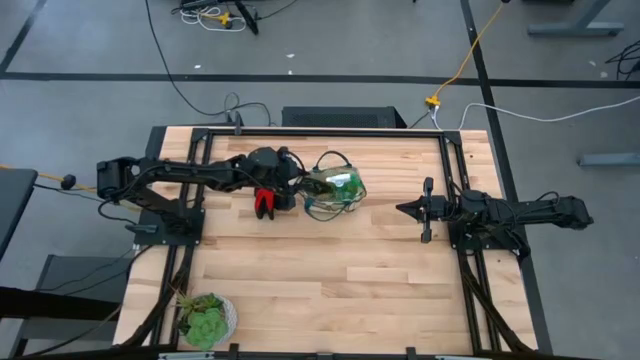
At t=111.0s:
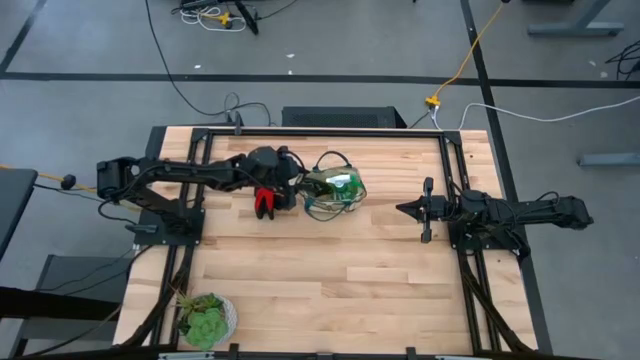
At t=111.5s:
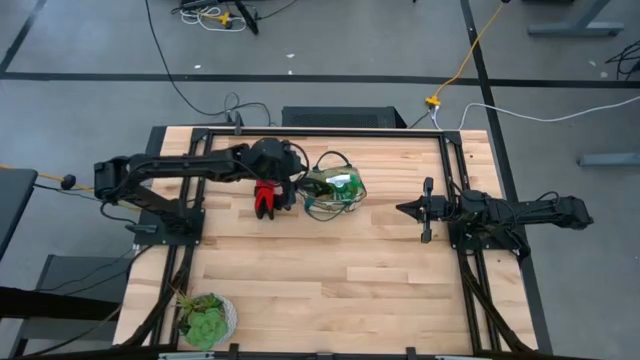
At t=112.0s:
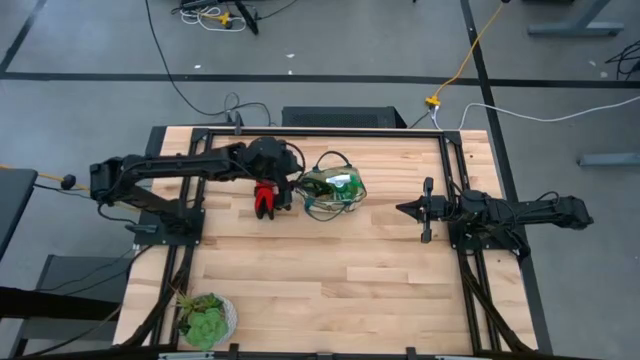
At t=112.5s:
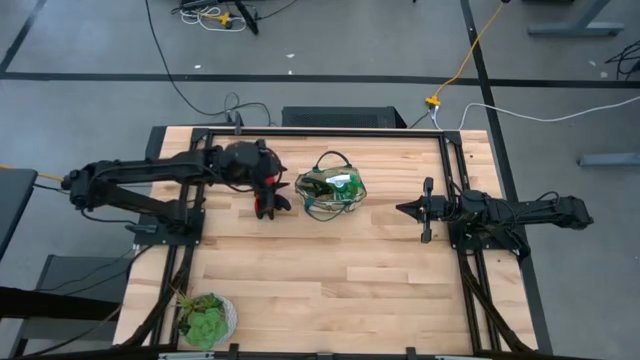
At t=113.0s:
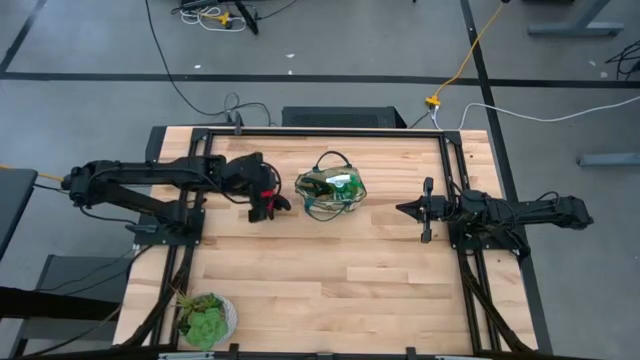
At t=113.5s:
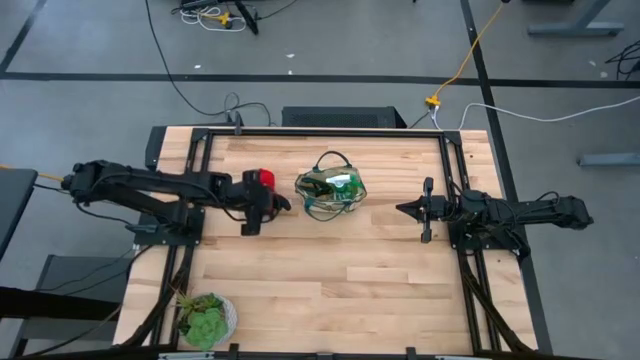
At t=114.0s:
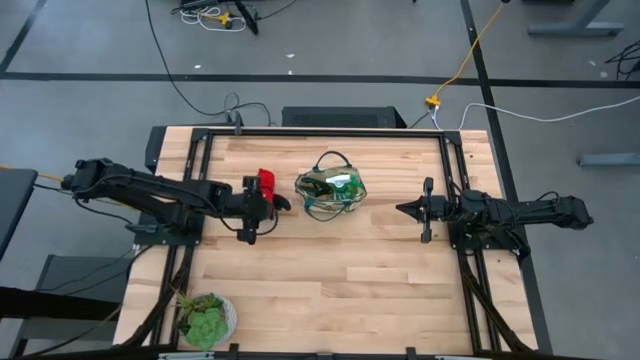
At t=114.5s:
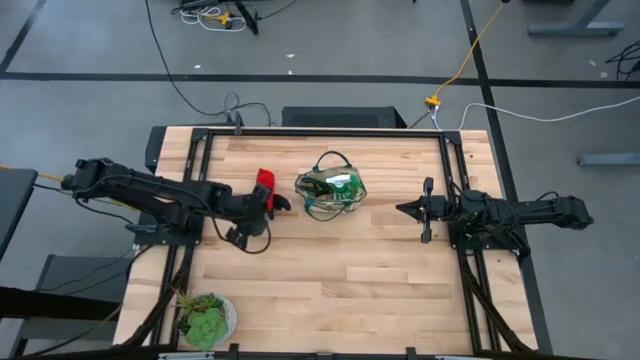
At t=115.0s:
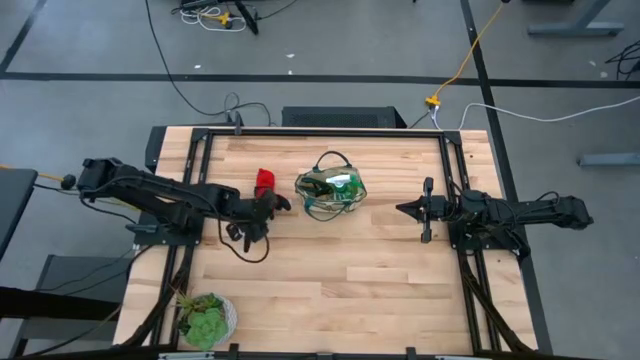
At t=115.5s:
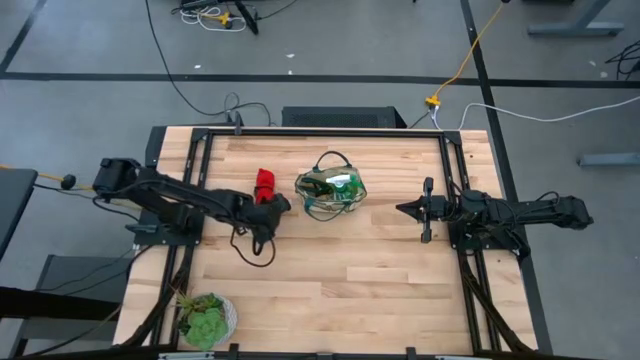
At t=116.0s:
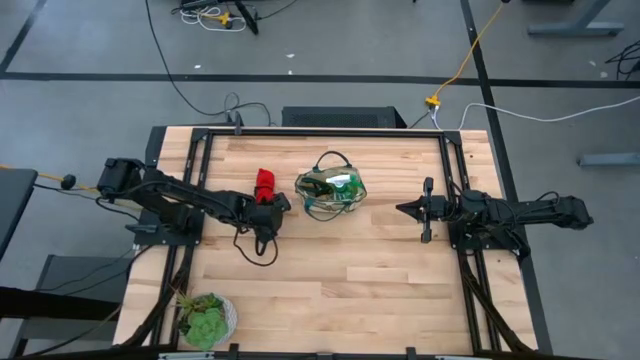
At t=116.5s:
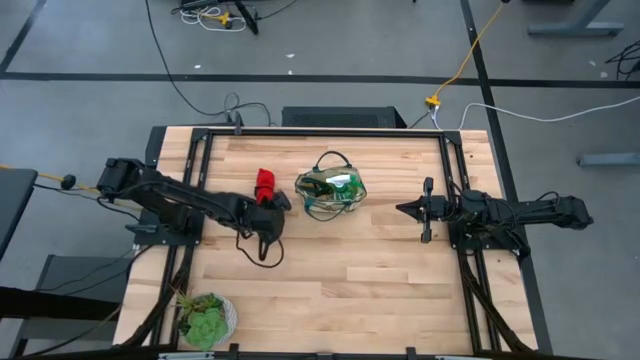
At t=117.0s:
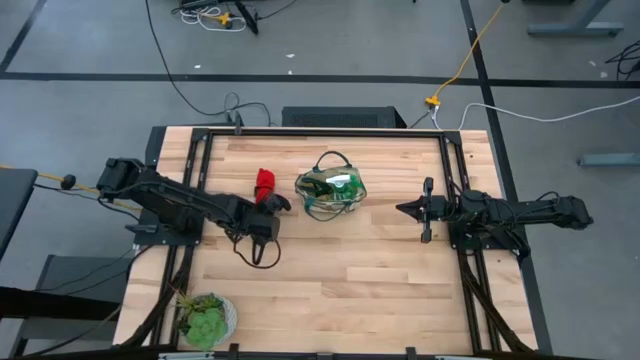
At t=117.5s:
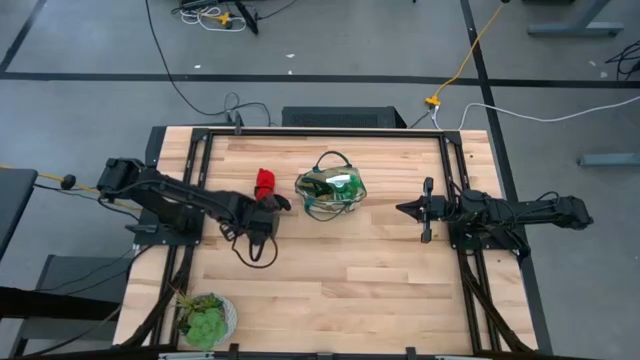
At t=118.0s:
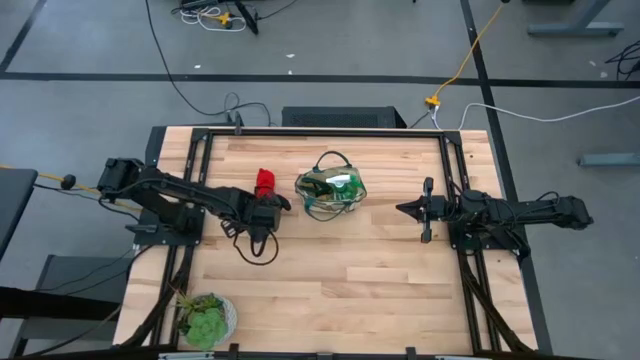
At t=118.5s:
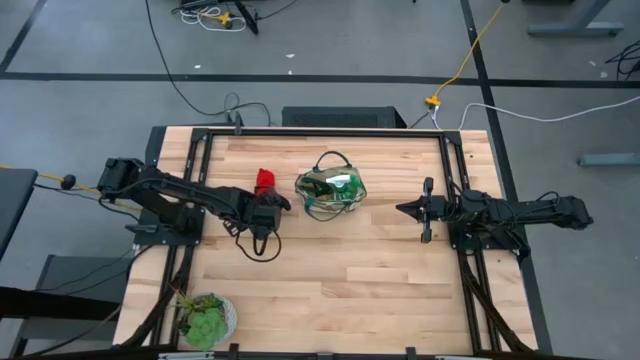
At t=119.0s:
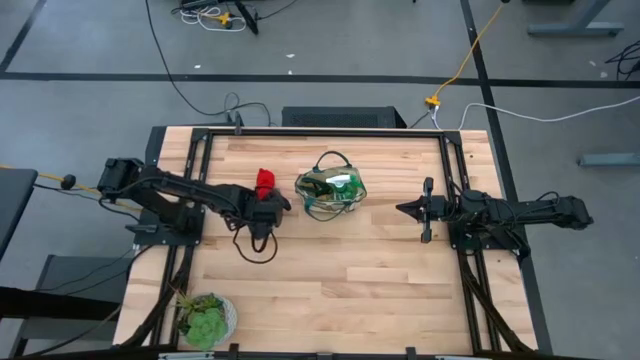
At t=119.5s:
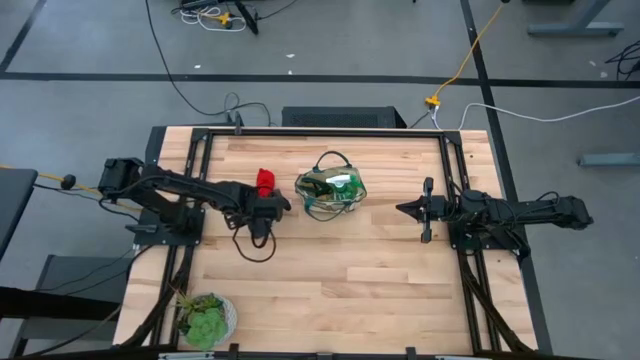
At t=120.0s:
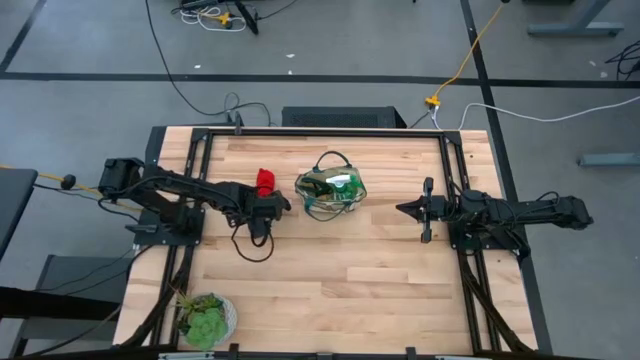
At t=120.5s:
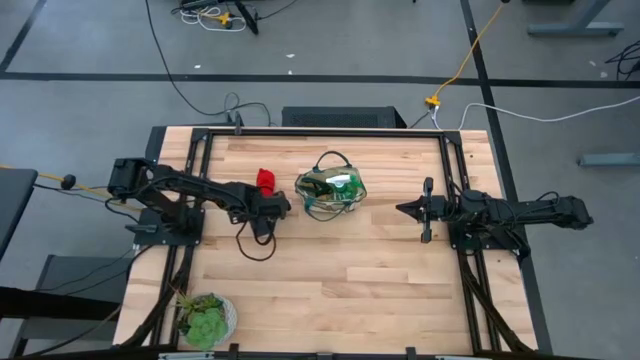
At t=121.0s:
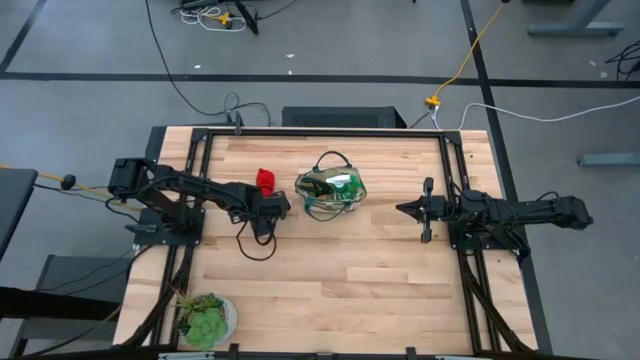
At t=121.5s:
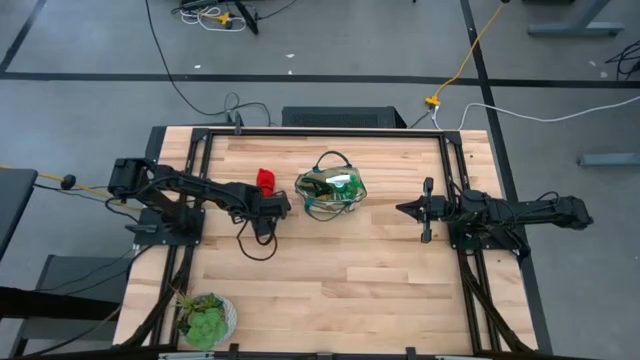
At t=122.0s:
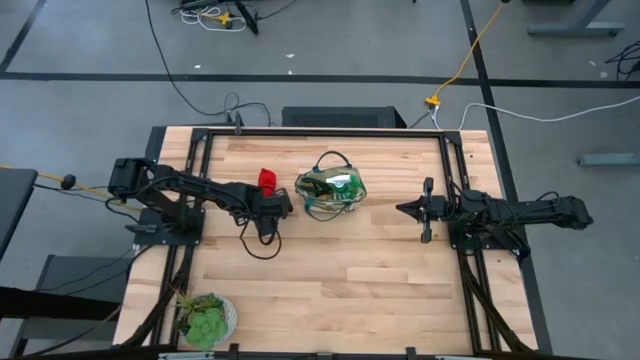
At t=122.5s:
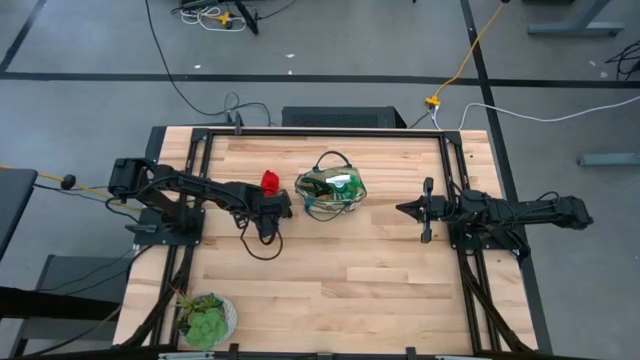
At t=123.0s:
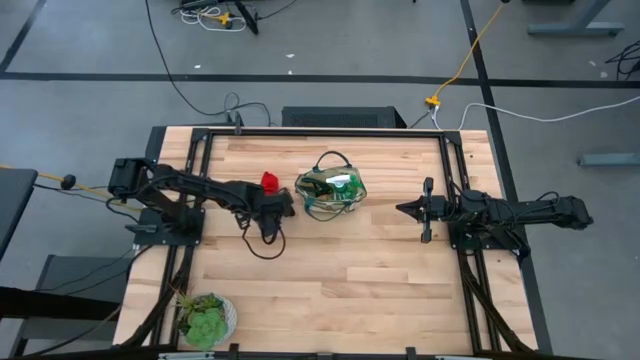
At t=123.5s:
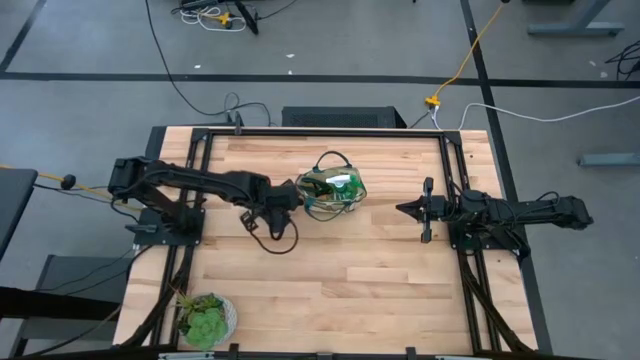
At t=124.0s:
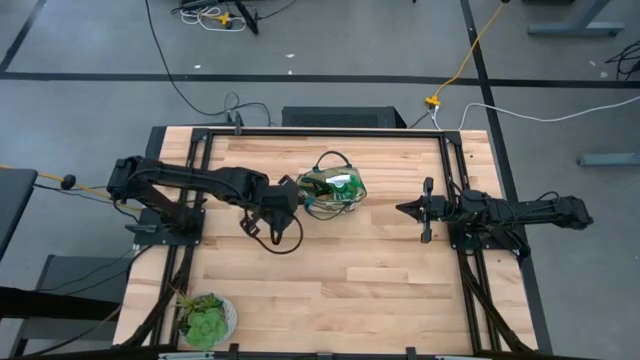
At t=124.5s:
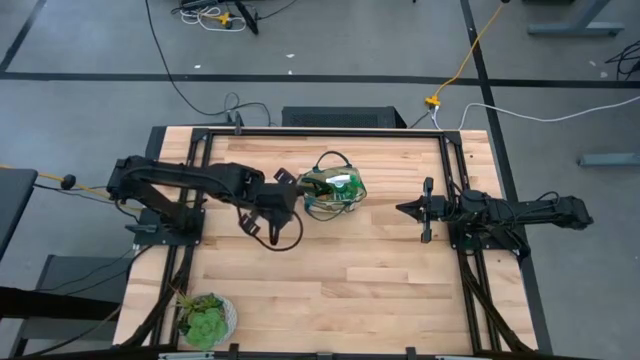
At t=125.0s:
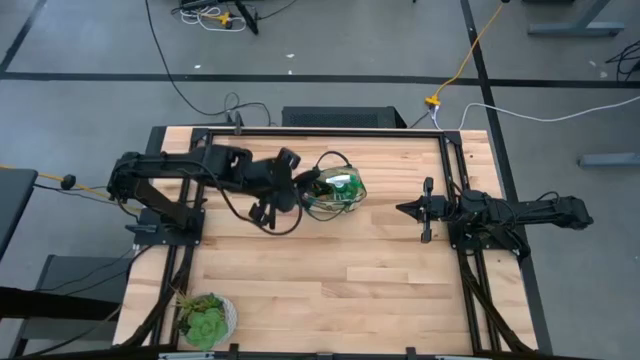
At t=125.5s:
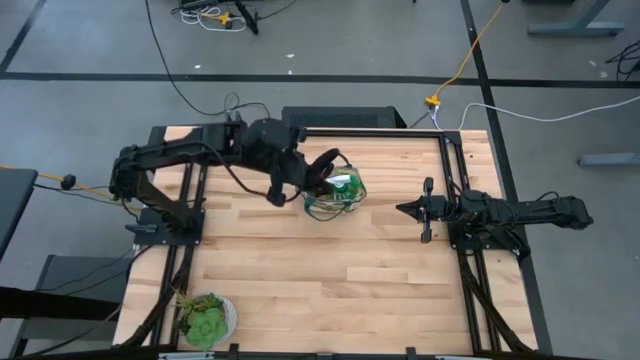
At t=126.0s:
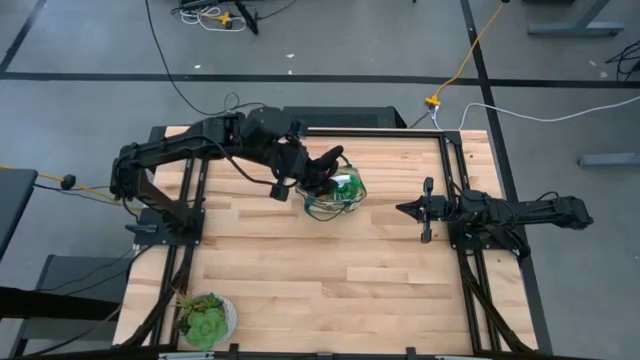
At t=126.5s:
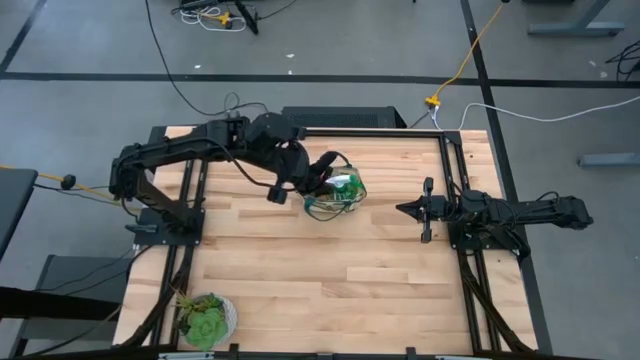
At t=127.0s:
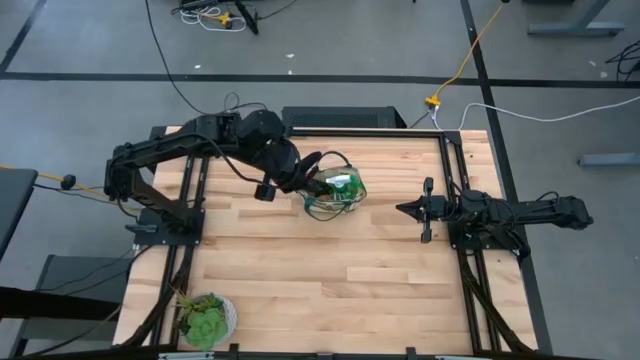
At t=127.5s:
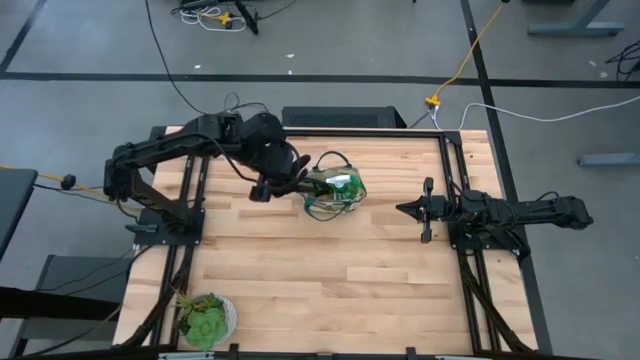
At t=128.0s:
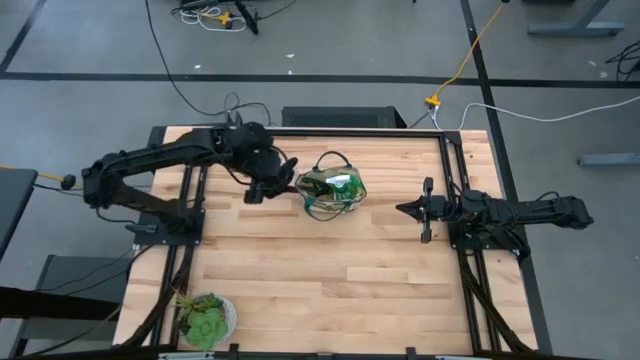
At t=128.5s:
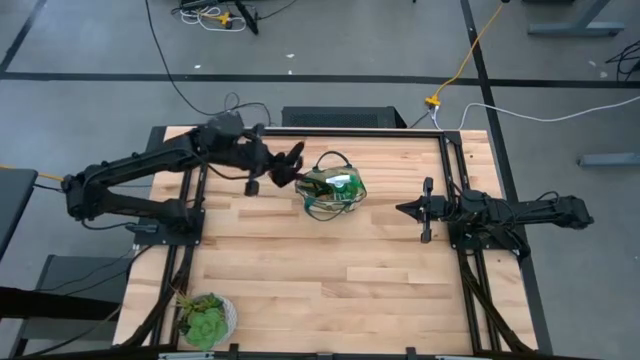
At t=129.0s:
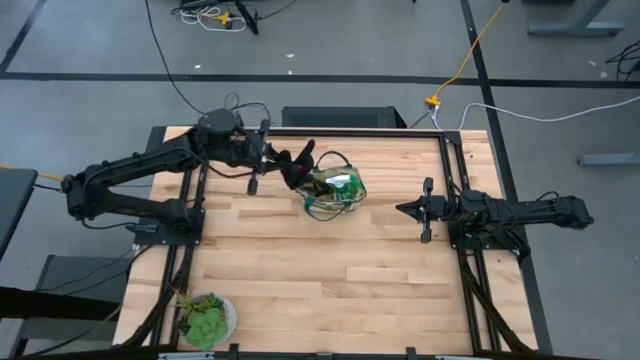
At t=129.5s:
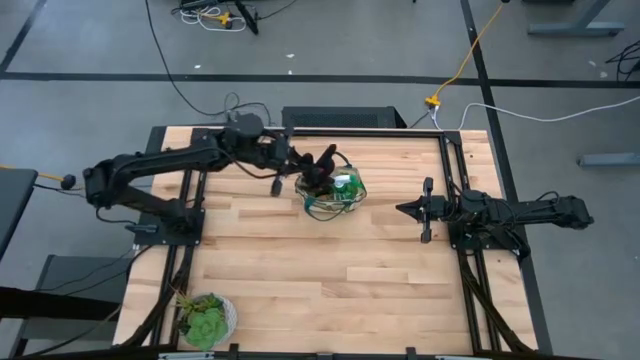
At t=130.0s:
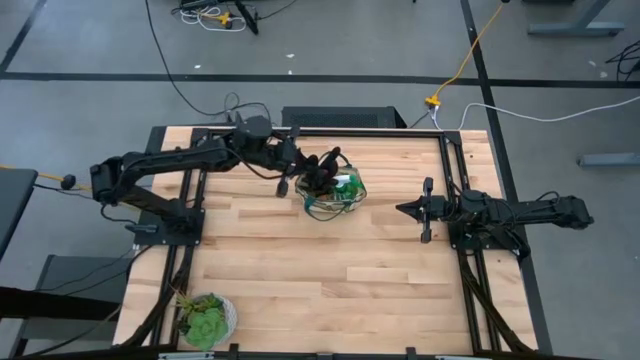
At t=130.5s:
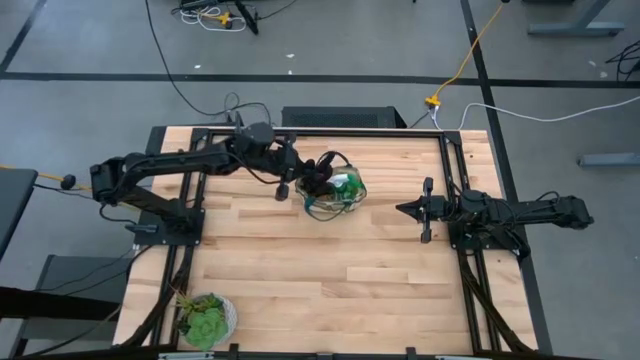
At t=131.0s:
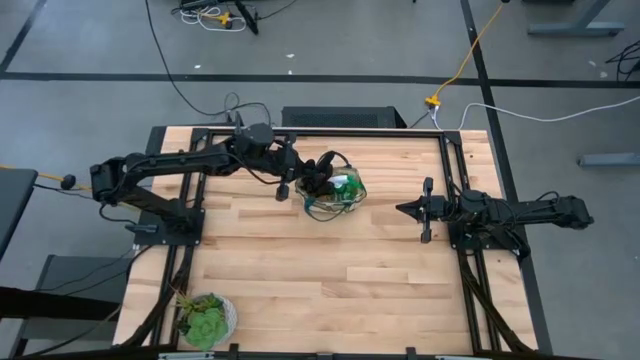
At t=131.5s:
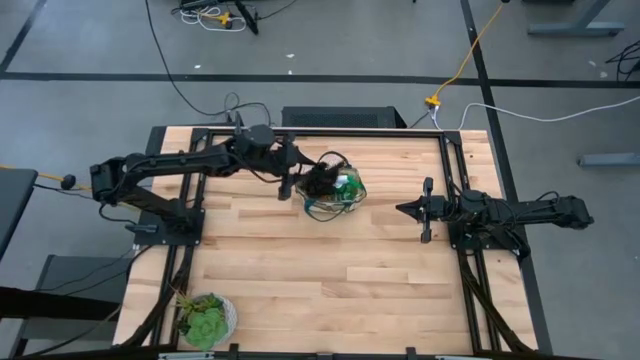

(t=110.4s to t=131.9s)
Task: Pick & Place Garden tools in Gardening bag
Put the red gloves into the gardening bag
